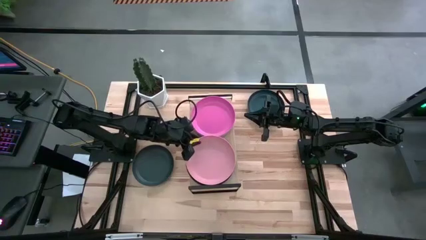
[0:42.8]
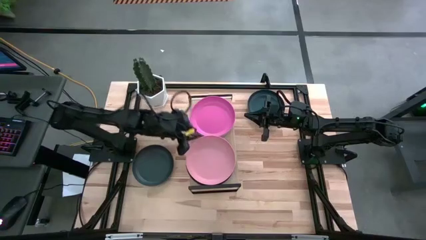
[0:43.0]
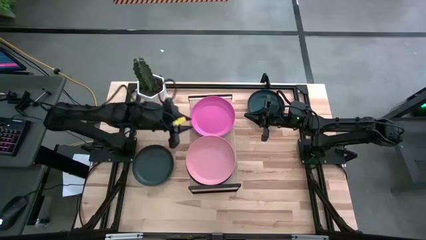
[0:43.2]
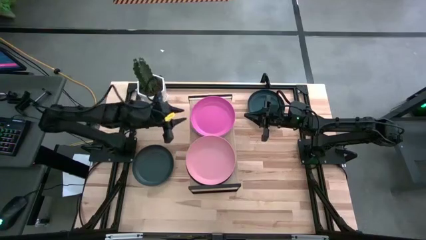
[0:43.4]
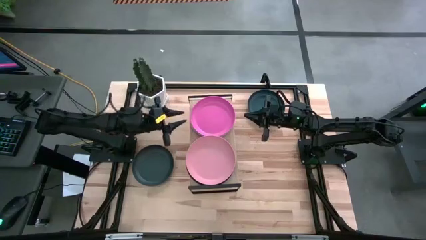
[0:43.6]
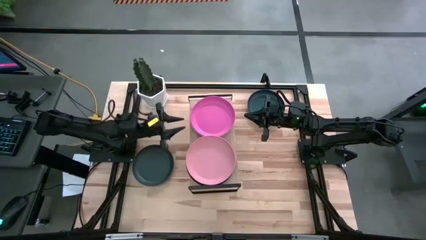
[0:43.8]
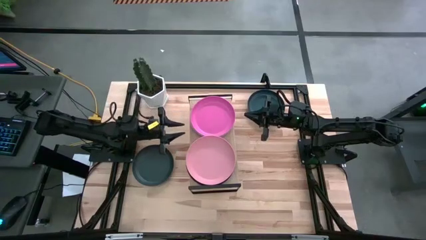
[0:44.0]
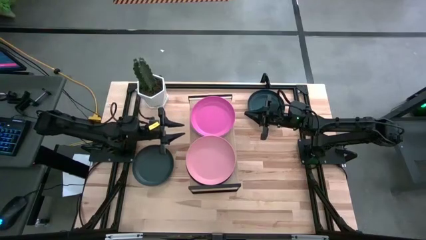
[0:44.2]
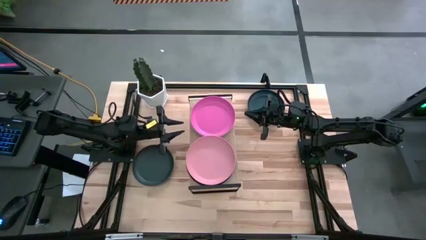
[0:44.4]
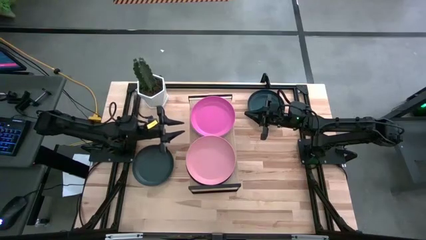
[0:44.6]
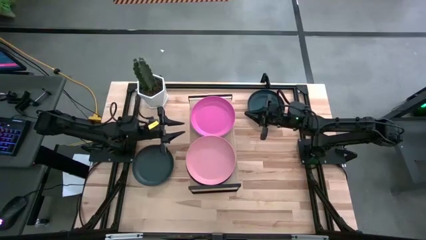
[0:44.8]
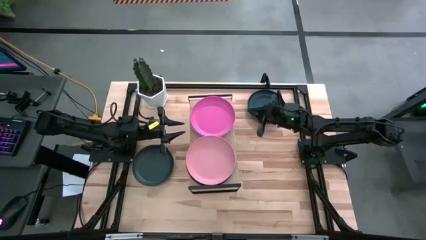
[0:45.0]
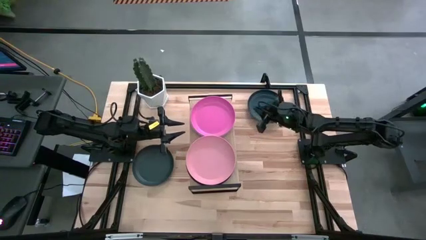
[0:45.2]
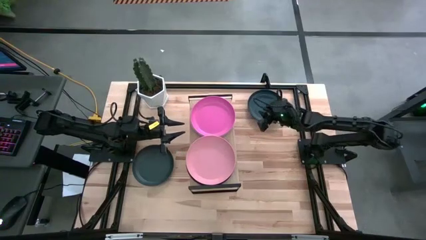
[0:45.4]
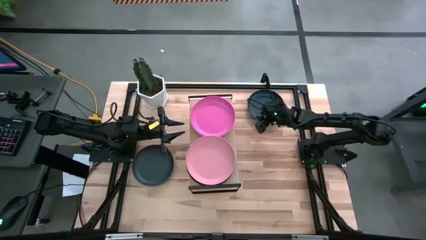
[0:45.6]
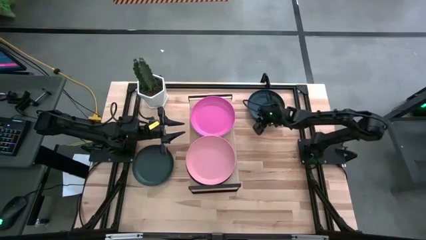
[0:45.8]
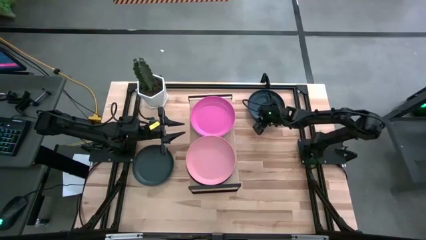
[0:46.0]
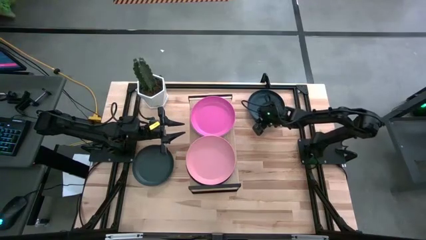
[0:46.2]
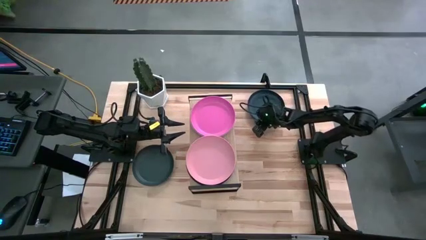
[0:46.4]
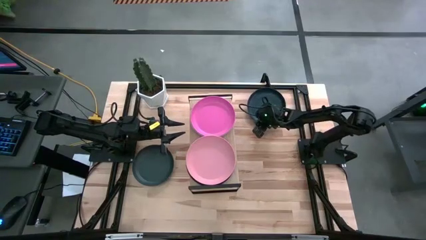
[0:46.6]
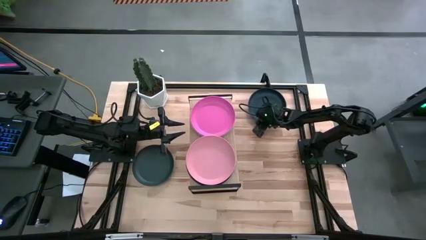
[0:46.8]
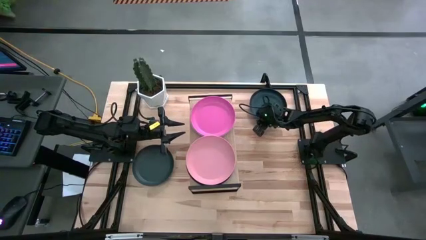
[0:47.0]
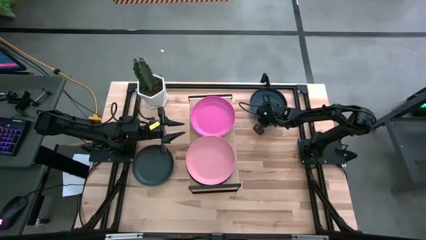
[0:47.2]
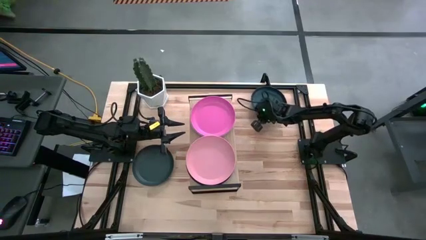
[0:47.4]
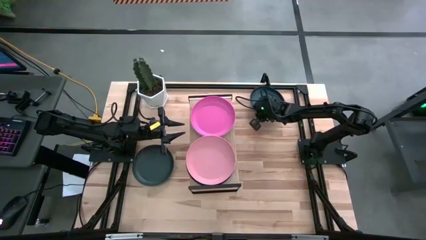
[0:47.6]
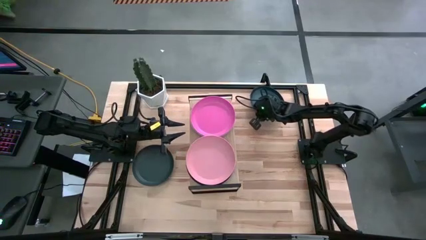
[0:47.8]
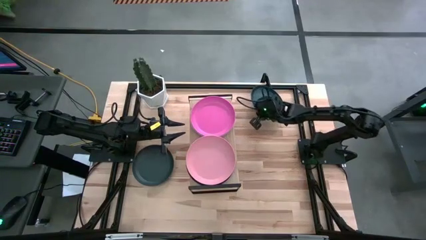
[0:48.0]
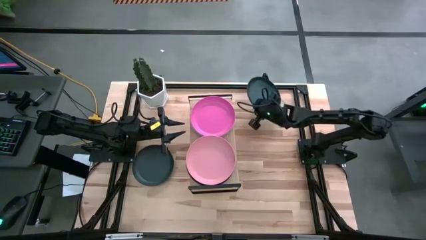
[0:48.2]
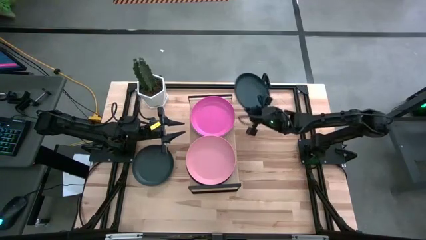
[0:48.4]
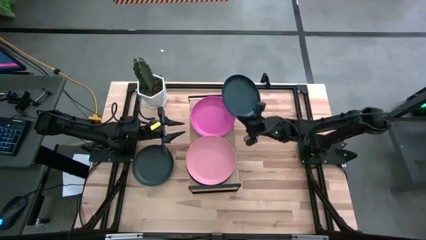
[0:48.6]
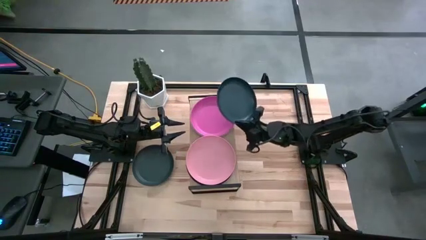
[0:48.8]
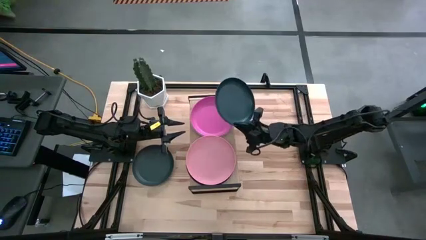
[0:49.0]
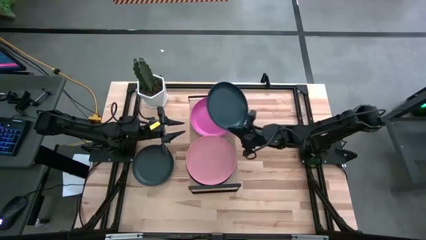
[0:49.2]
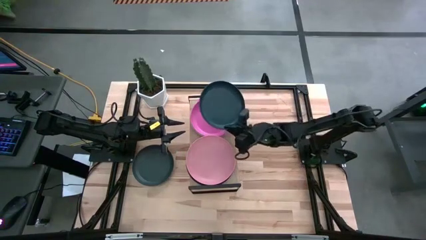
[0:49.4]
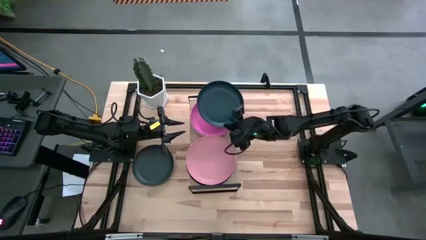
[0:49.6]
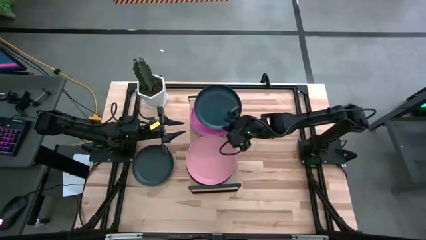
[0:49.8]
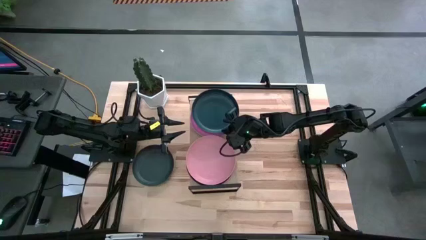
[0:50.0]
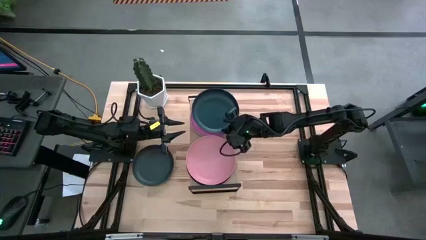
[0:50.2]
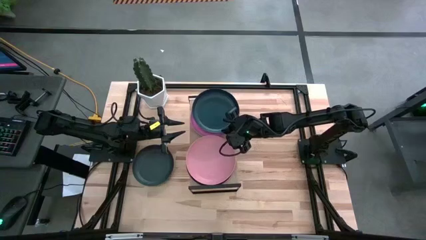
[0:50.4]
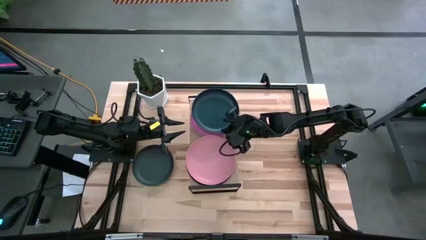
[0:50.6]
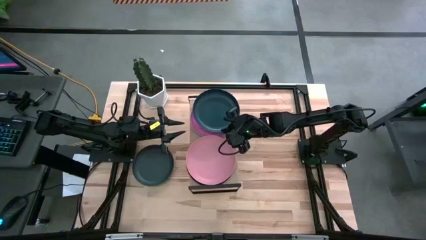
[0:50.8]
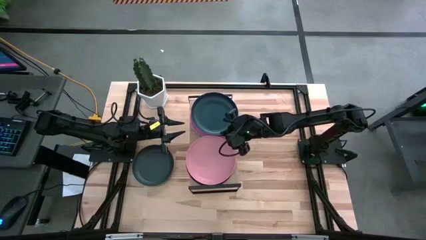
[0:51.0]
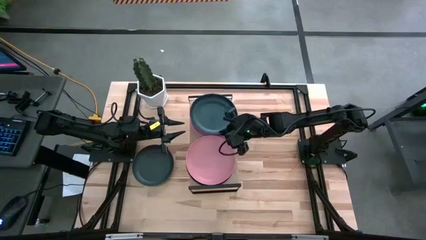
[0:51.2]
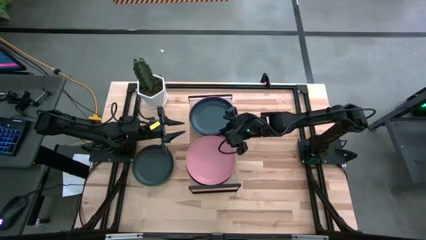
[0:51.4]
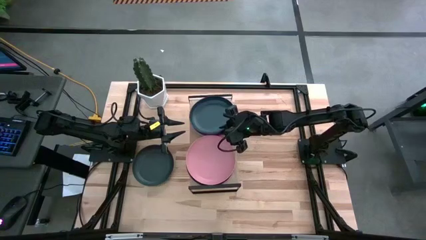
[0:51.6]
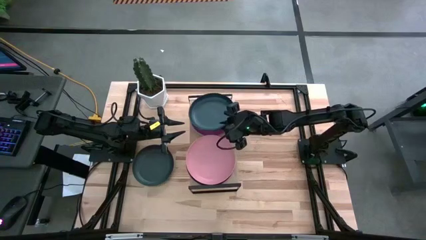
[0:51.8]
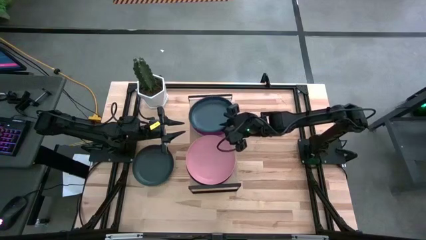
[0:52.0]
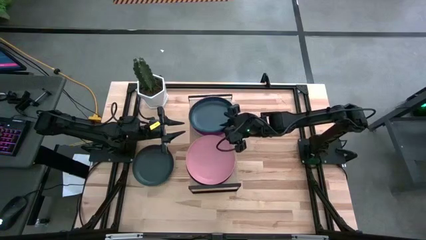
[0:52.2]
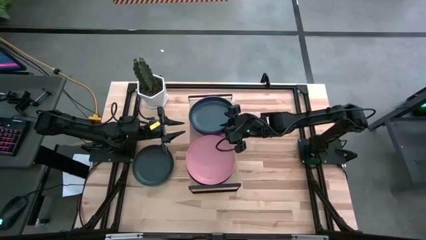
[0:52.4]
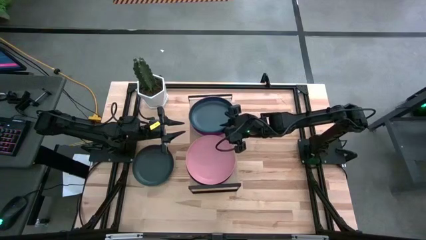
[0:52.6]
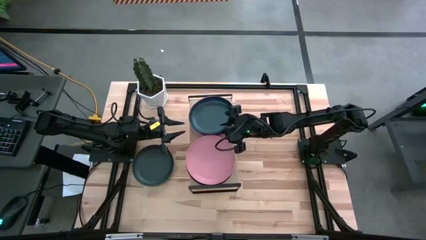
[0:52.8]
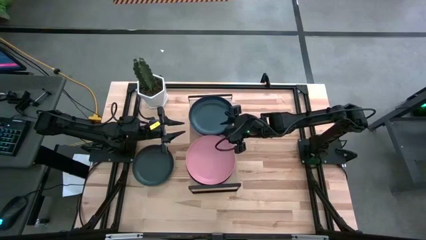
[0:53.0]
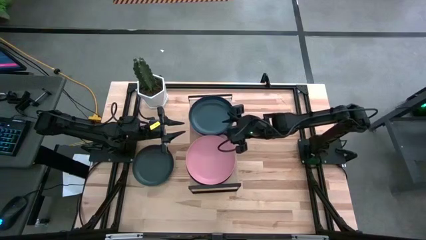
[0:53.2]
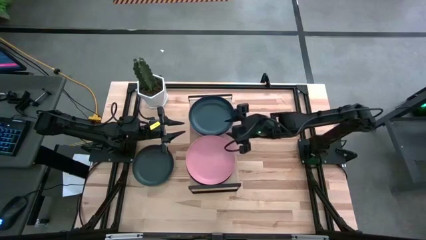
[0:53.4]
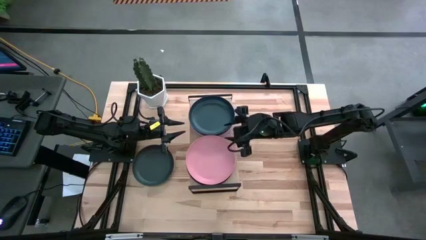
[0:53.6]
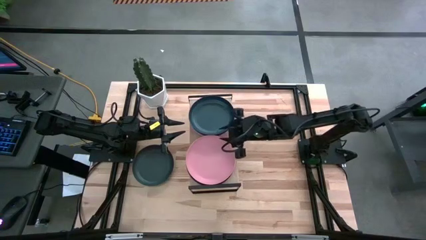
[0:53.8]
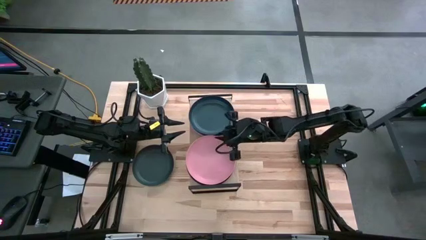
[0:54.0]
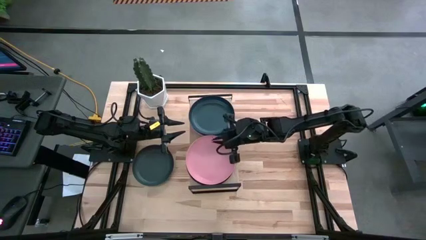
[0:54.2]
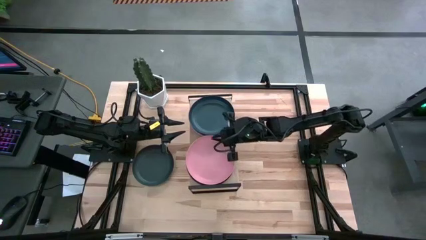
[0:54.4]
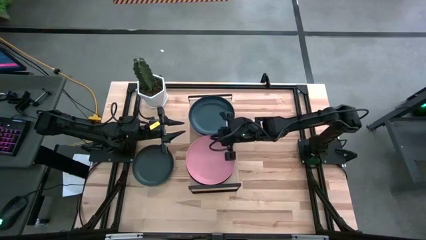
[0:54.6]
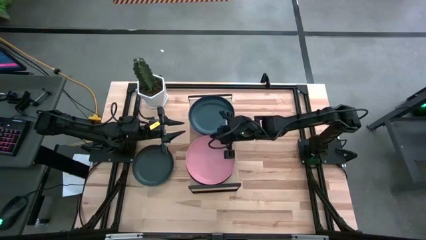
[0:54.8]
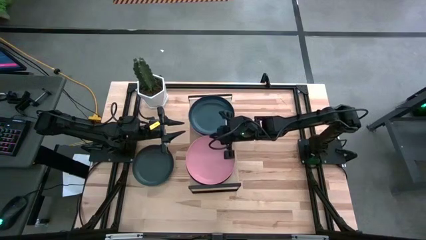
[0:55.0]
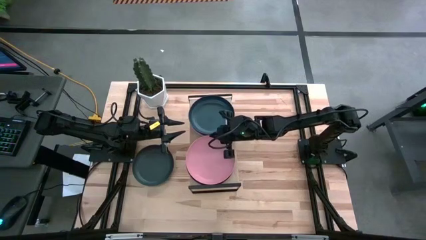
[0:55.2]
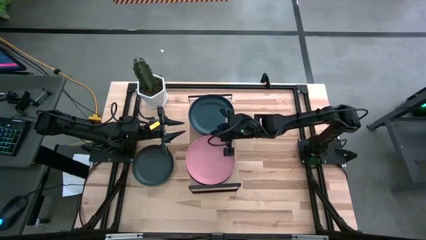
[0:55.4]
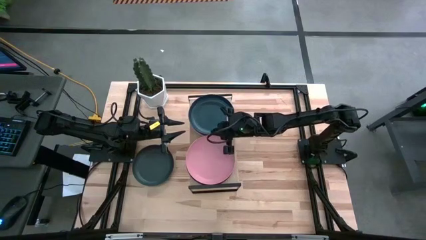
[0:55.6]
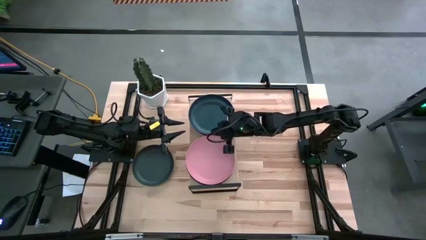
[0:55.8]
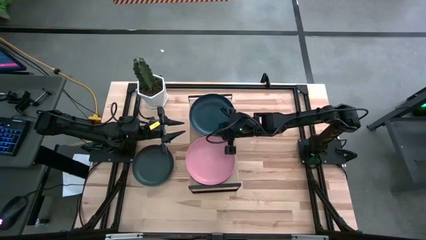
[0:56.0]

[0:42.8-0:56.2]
Task: Place and stack plates onto a shelf
Stack the green plate on top of the pink plate on the shelf
